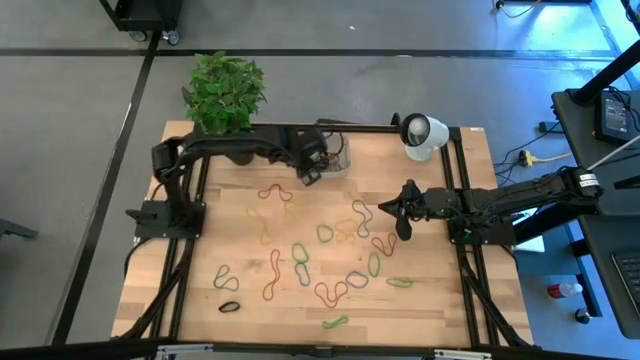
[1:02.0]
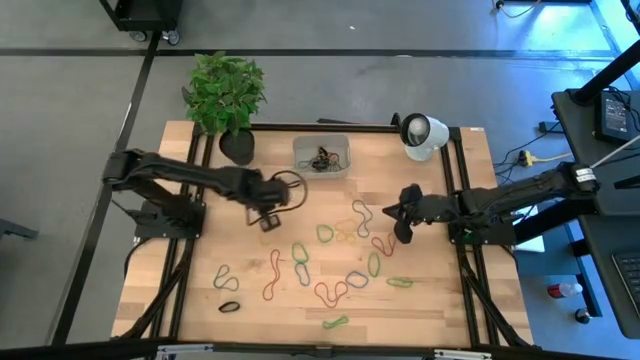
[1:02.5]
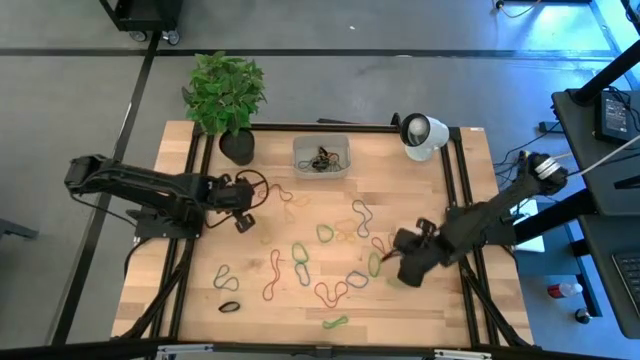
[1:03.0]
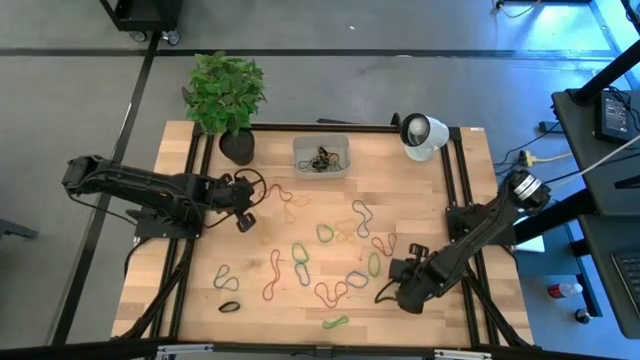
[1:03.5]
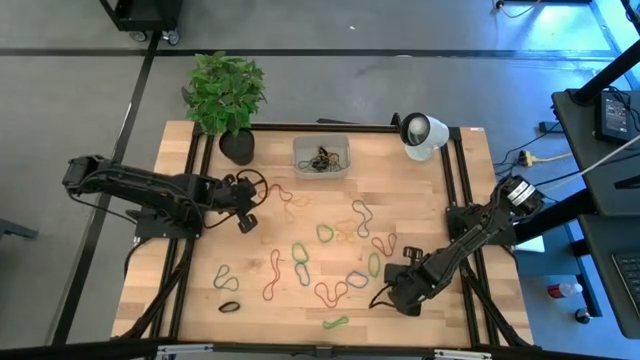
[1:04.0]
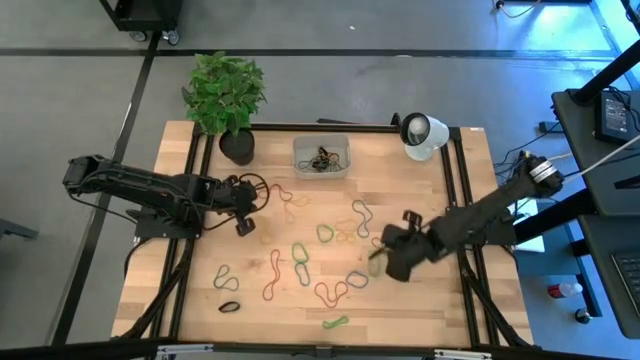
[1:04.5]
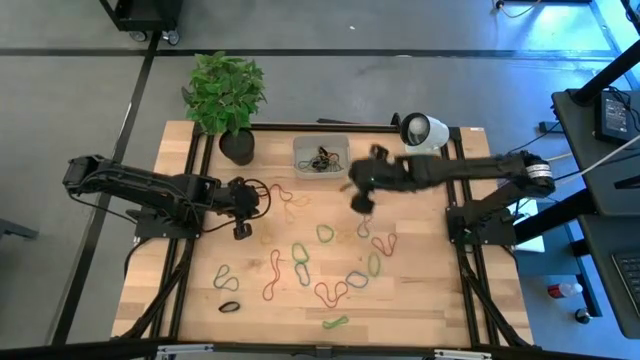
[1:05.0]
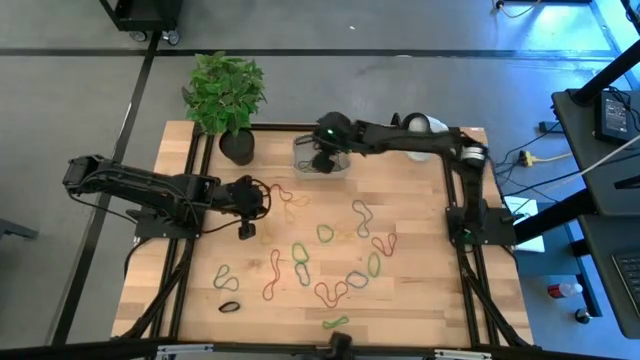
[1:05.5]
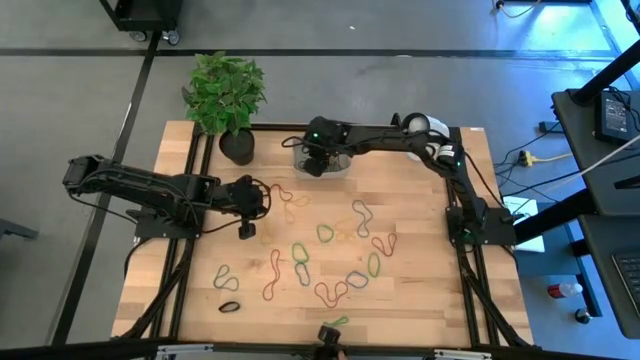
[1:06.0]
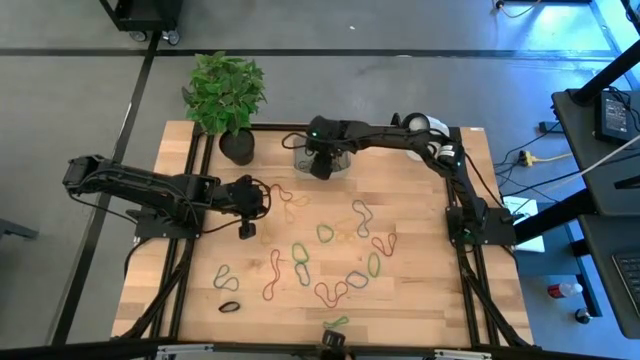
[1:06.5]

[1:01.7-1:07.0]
Task: Pick and place rubber bands into bin
Put the green rubber band into the gray bin

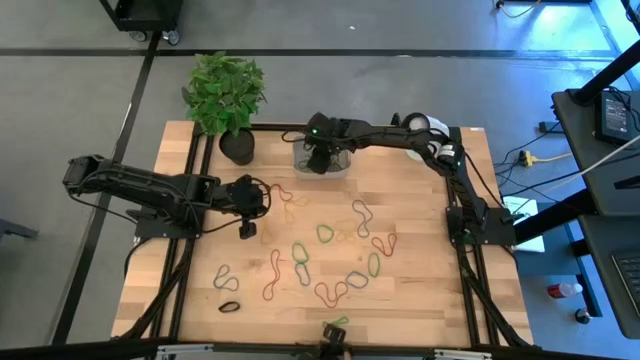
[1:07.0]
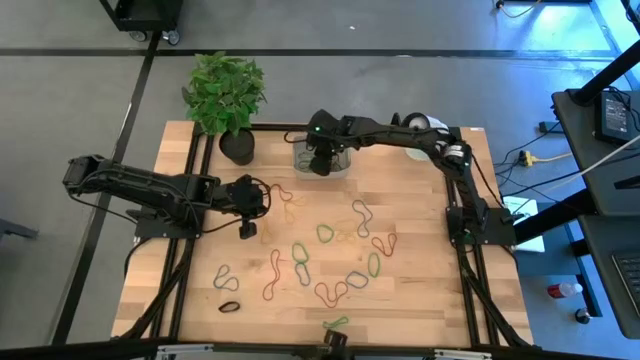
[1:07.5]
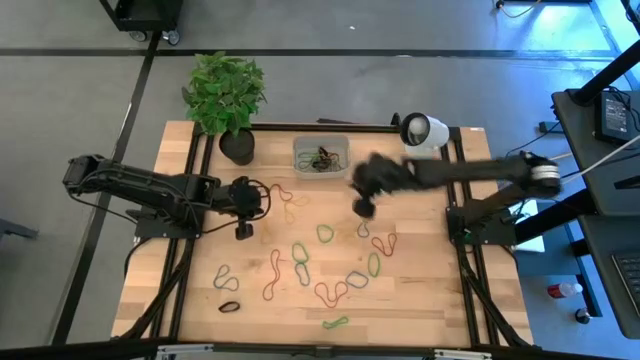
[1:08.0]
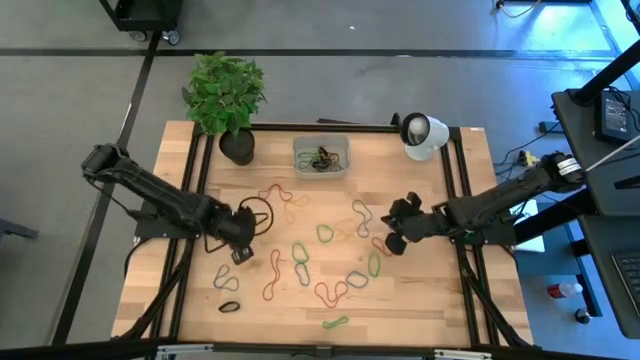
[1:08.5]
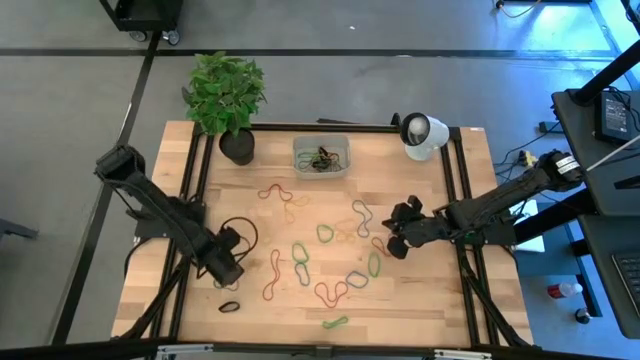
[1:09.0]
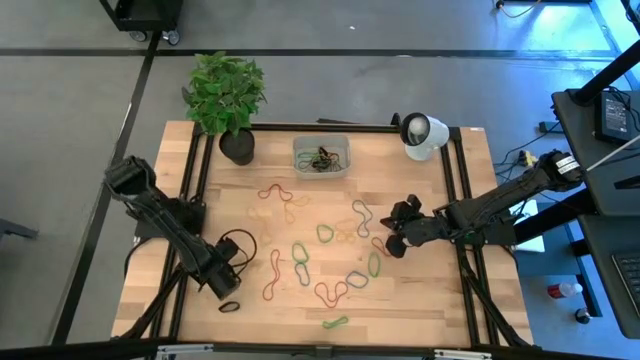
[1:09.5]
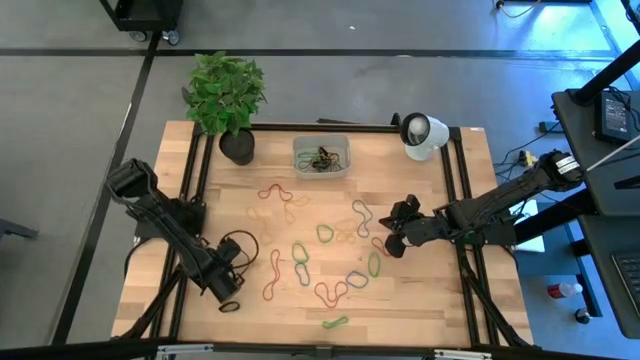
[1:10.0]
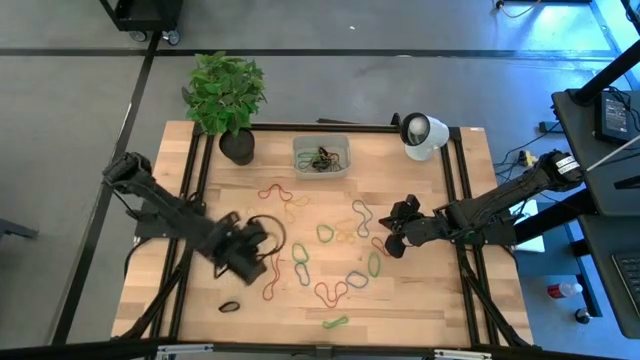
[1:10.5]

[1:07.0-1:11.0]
Put the blue rubber band into the gray bin

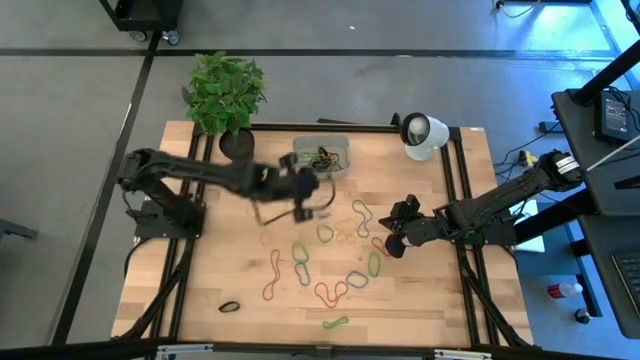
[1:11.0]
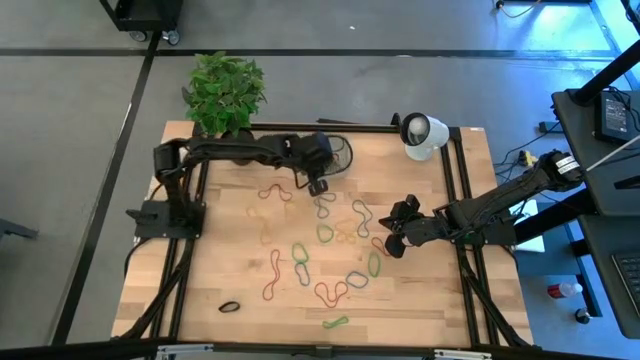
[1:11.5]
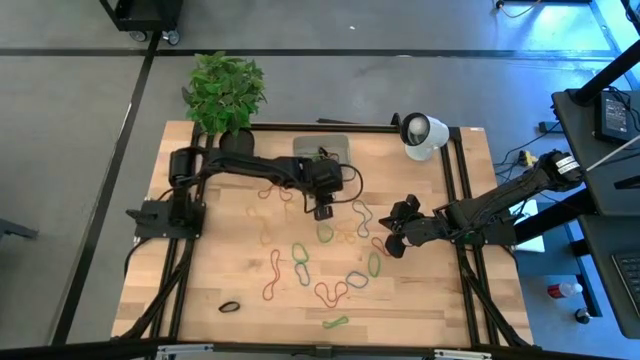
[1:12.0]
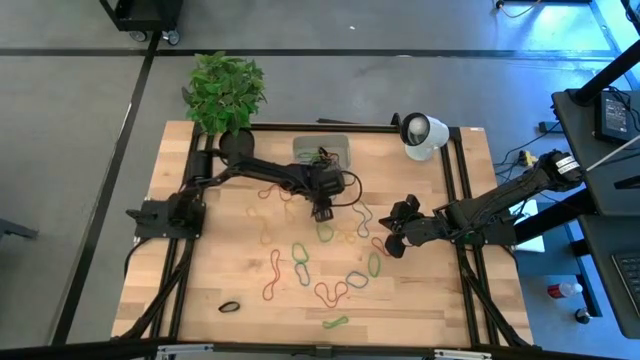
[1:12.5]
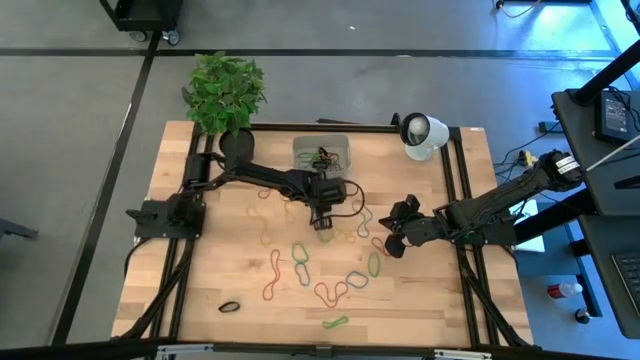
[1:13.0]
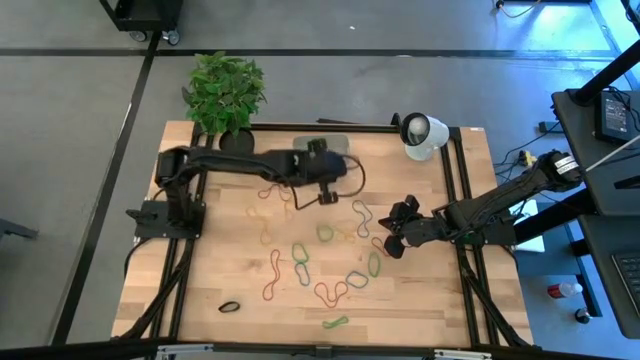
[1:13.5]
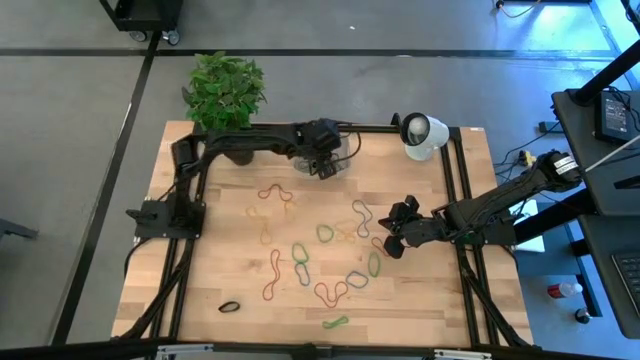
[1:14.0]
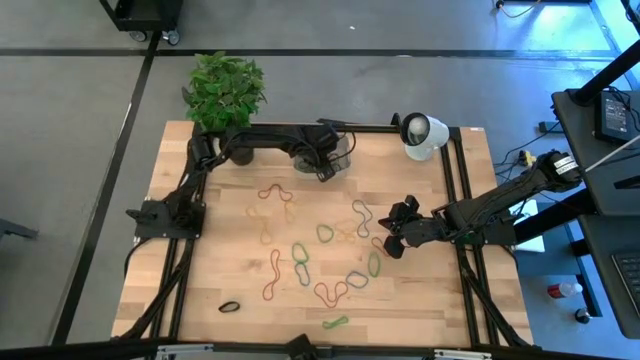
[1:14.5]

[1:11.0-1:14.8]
Put the blue rubber band into the gray bin

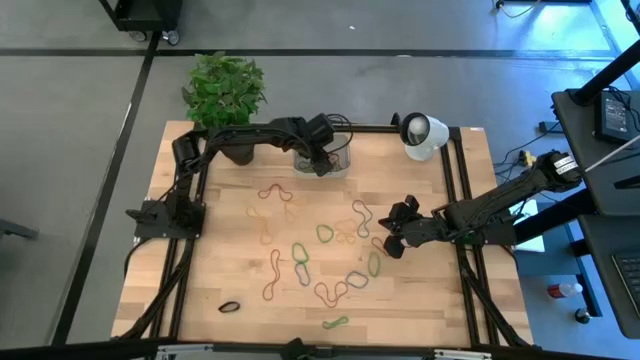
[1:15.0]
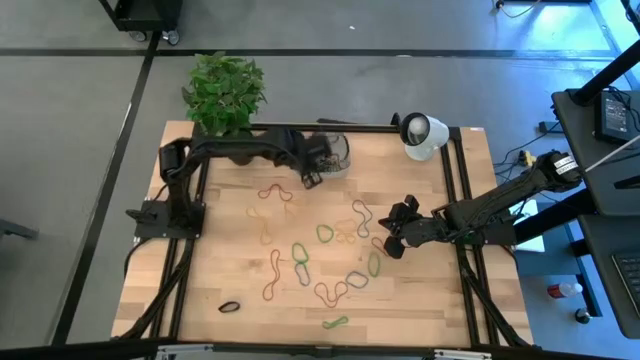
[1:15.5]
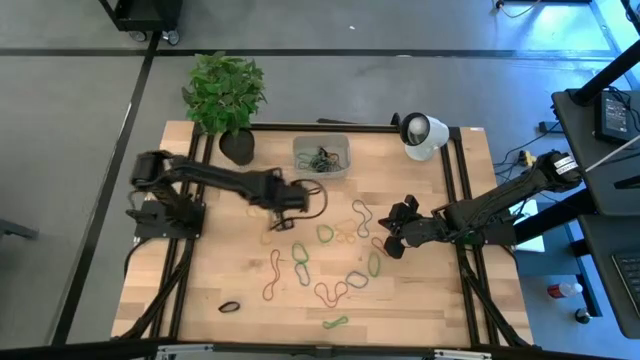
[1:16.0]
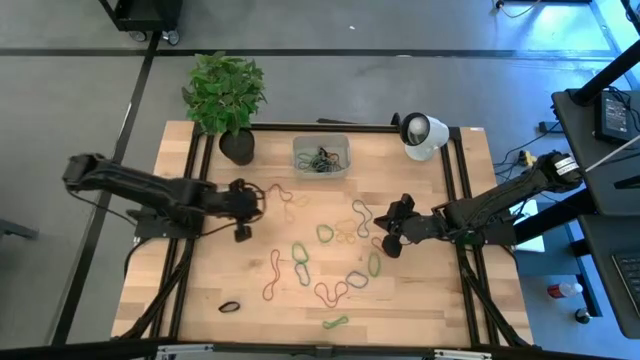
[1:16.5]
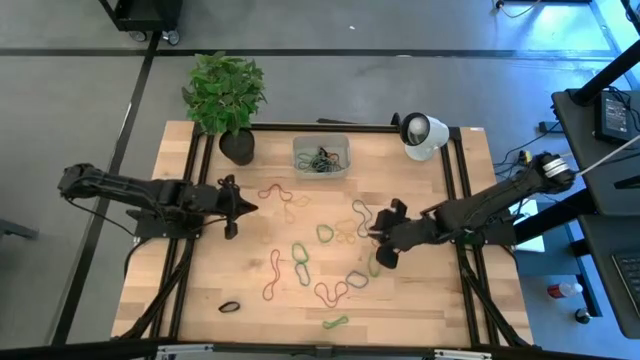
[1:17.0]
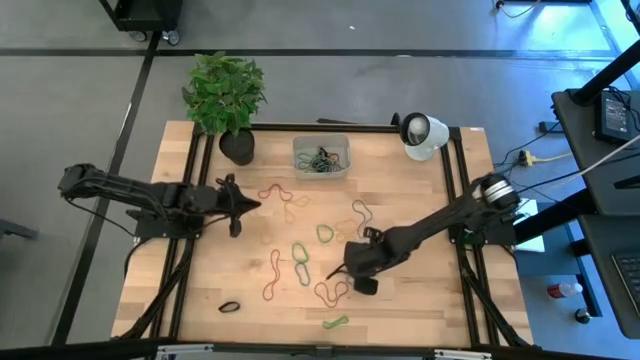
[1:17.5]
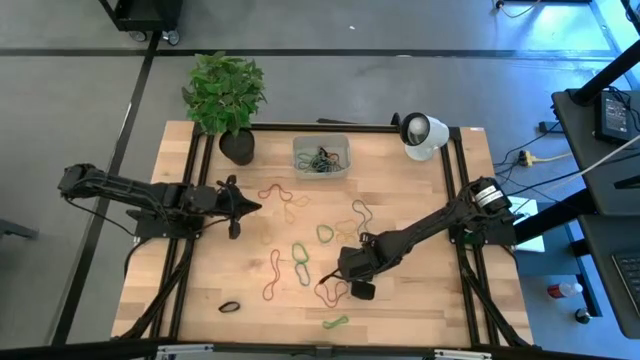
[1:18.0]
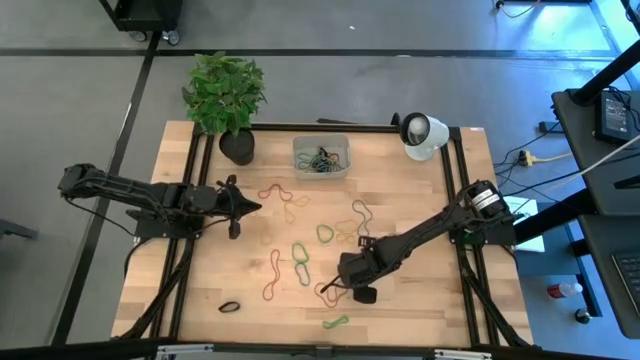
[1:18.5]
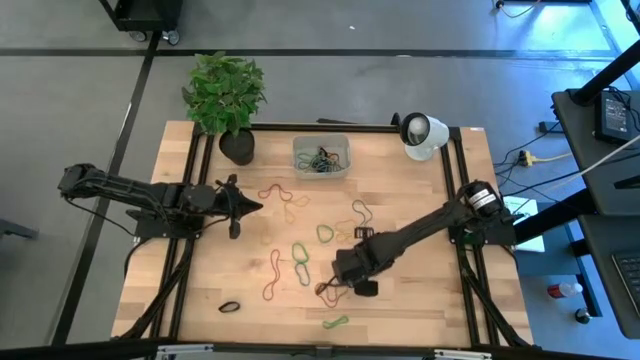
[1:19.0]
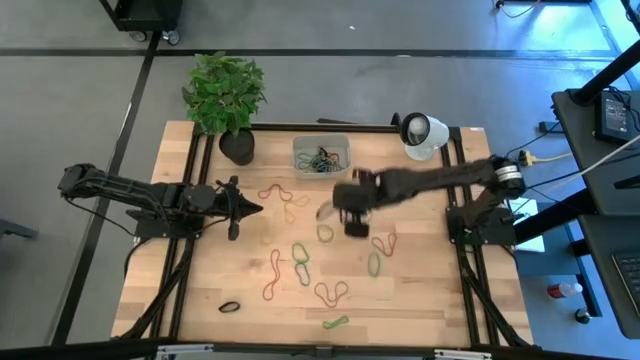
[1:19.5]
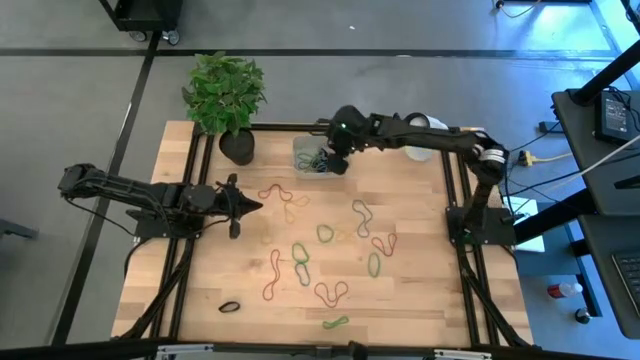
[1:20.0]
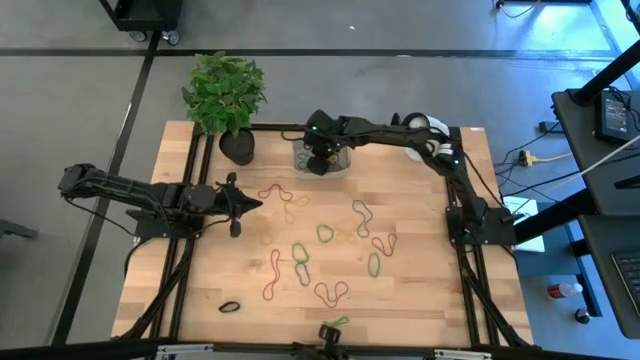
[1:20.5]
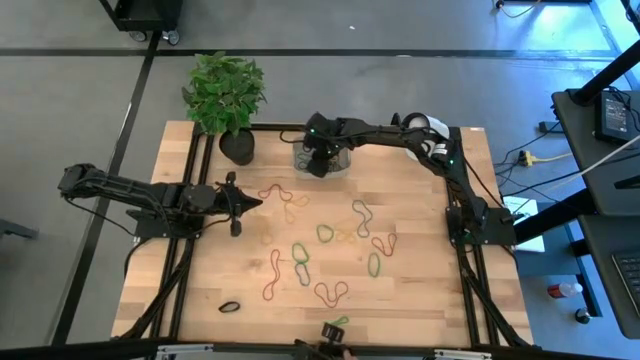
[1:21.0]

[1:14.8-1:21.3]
Put the blue rubber band into the gray bin

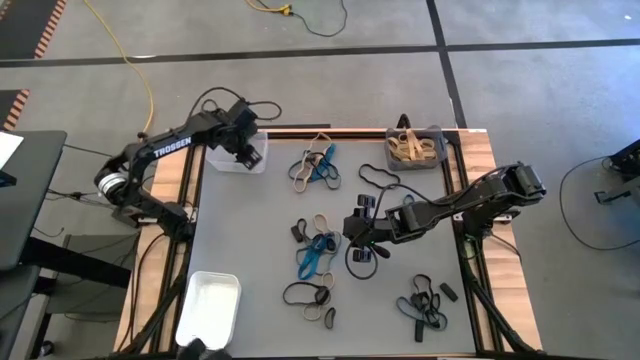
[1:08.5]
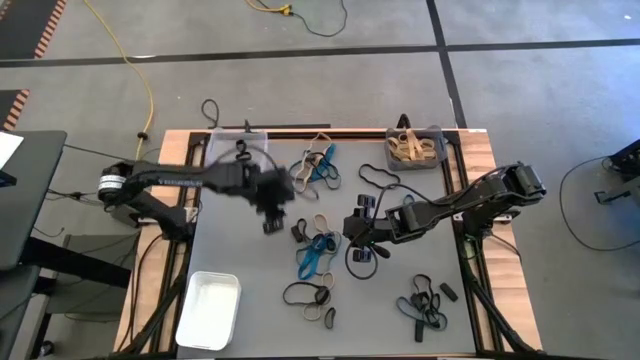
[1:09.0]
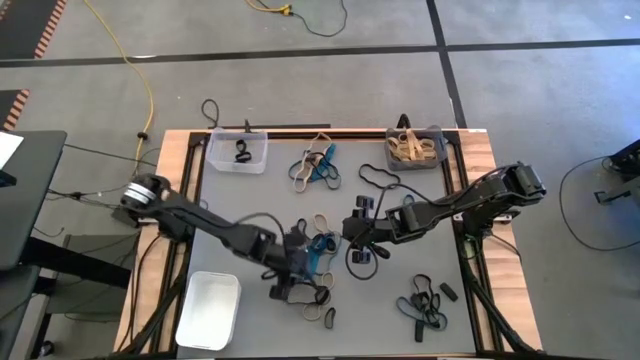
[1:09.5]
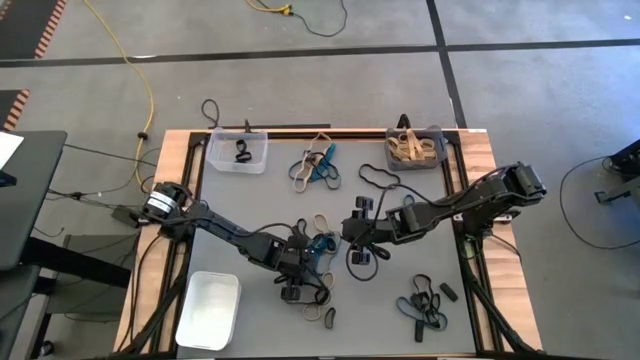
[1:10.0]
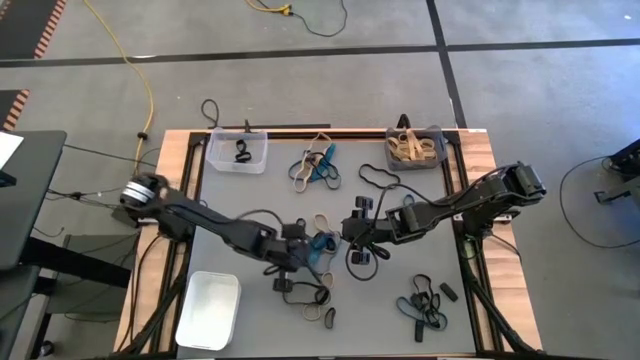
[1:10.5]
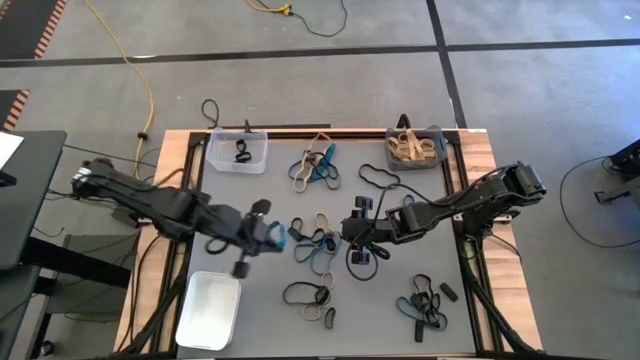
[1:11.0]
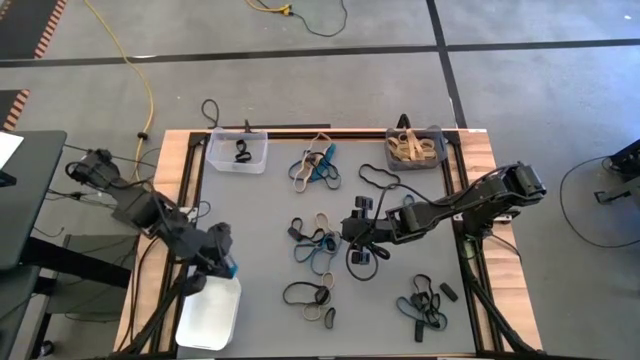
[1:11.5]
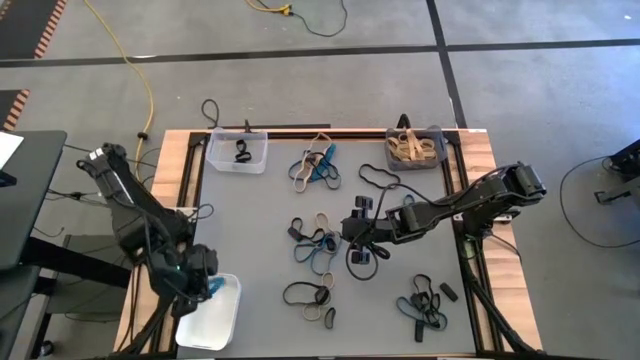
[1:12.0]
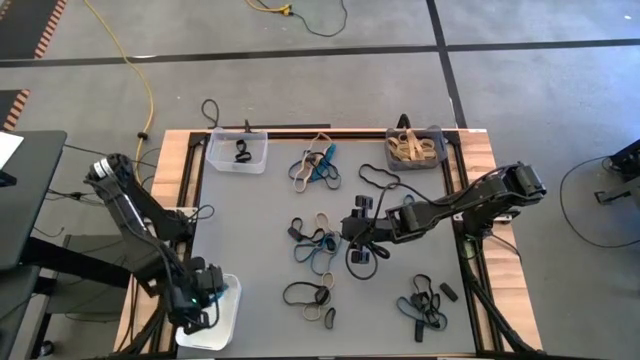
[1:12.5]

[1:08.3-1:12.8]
Task: Sort rubber bands into baskets
Put the blue rubber band into the white bin
